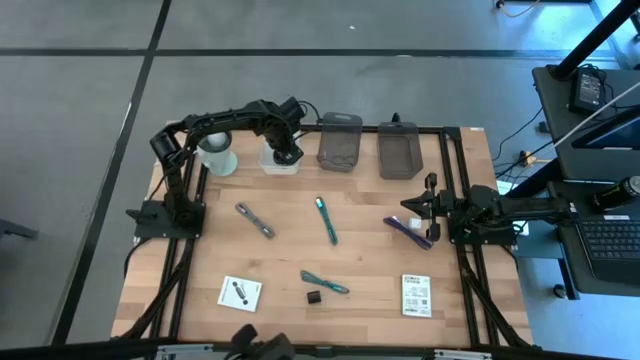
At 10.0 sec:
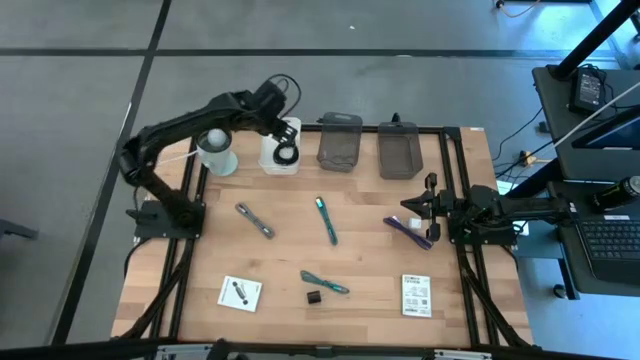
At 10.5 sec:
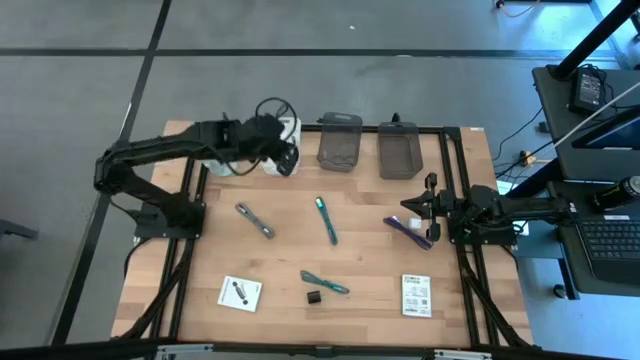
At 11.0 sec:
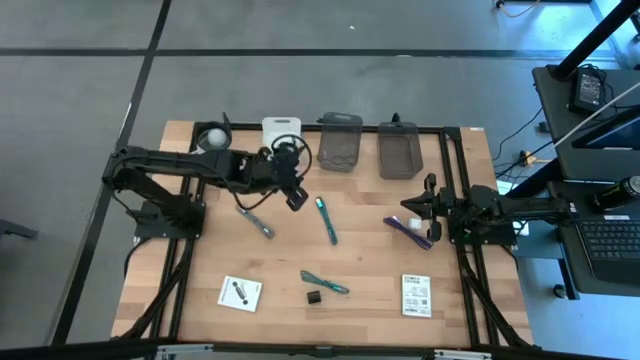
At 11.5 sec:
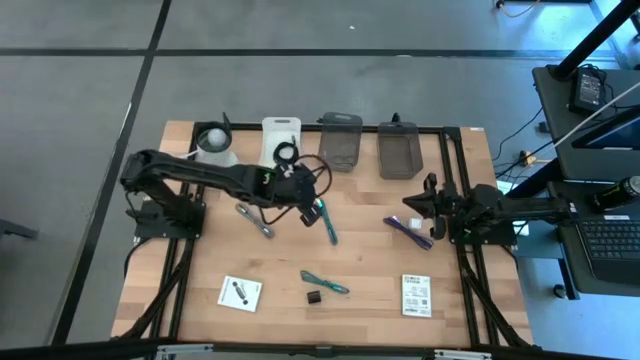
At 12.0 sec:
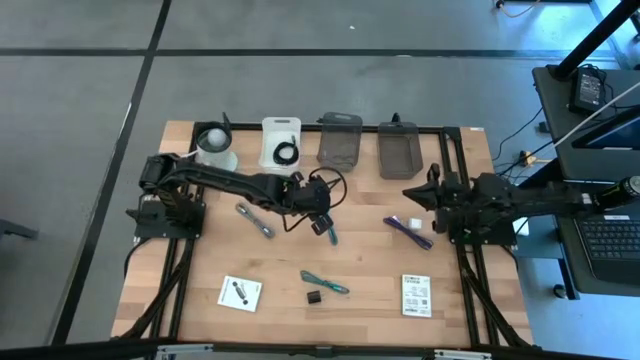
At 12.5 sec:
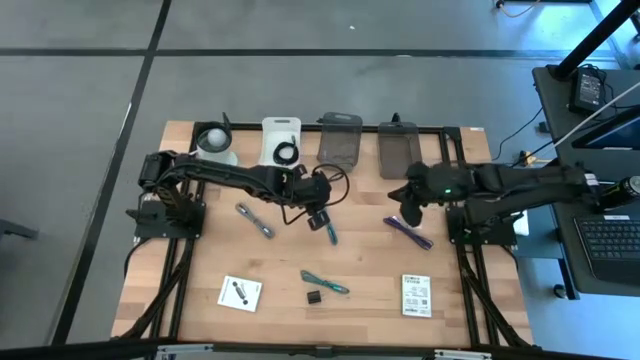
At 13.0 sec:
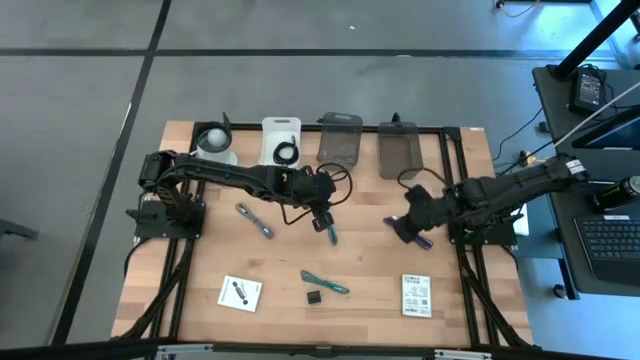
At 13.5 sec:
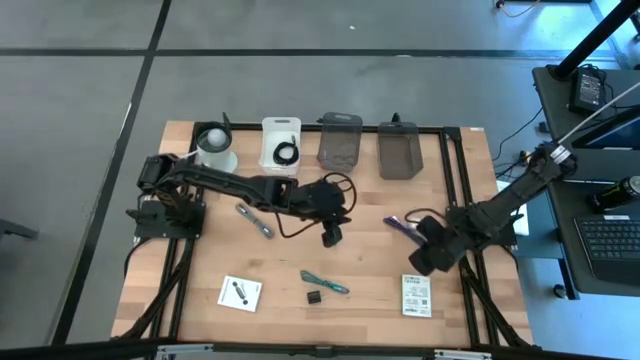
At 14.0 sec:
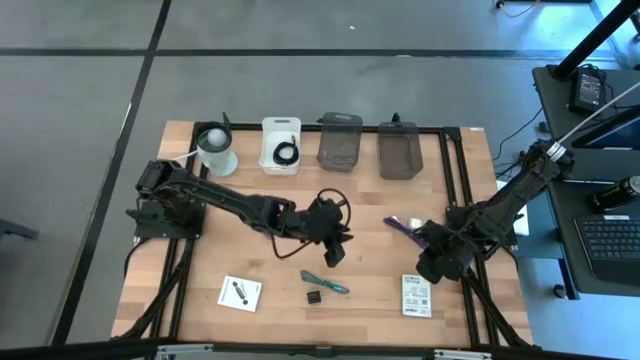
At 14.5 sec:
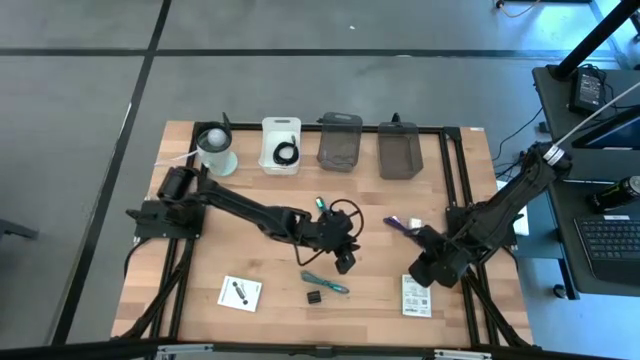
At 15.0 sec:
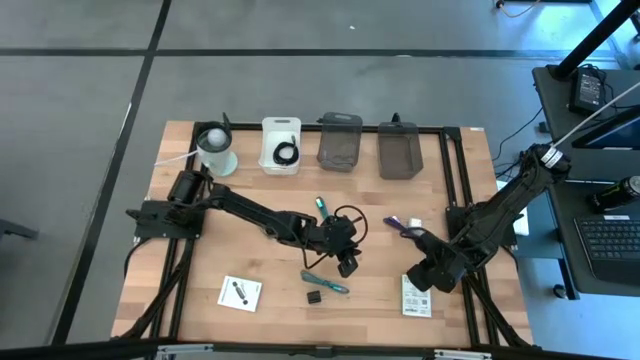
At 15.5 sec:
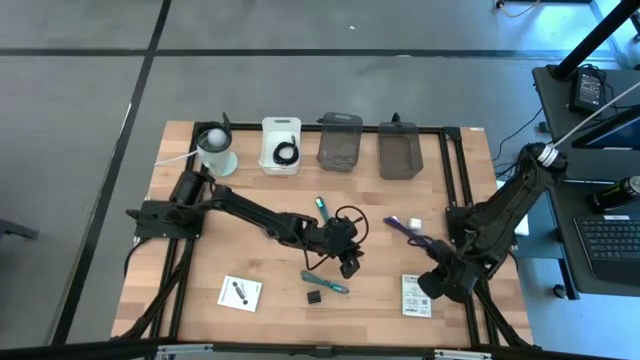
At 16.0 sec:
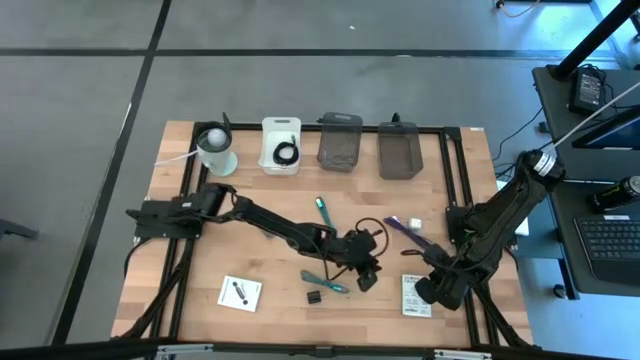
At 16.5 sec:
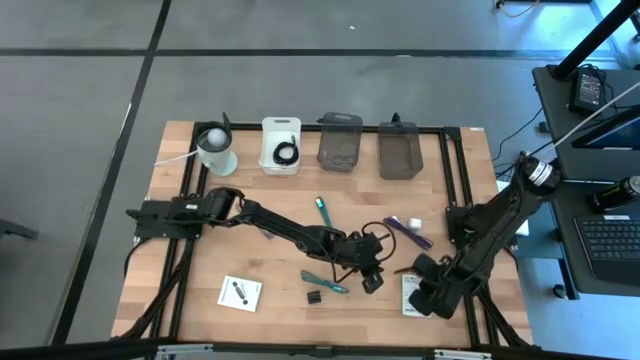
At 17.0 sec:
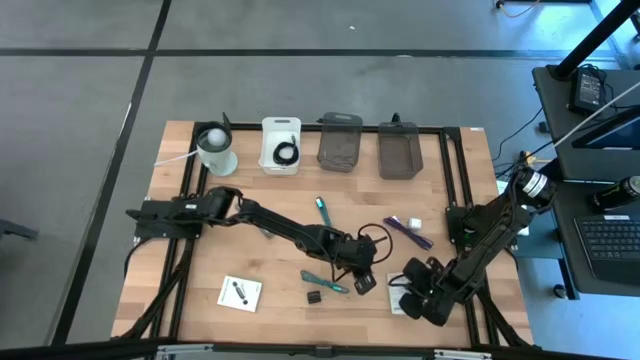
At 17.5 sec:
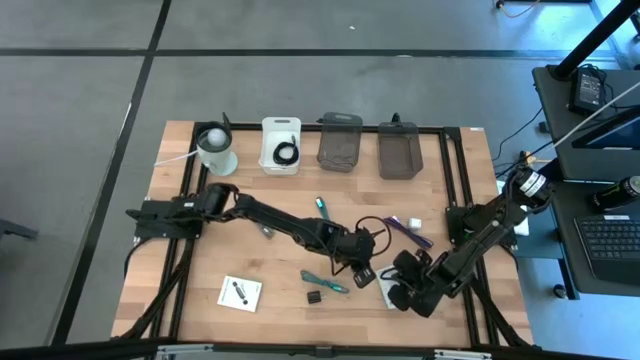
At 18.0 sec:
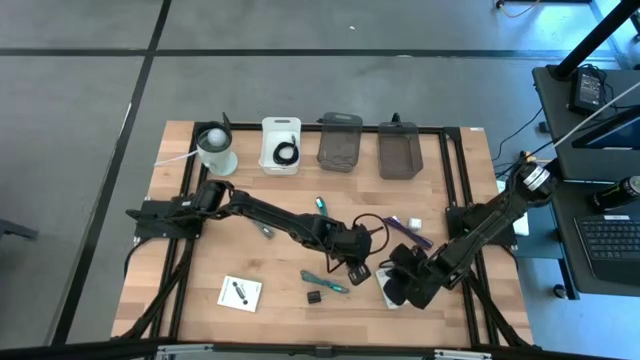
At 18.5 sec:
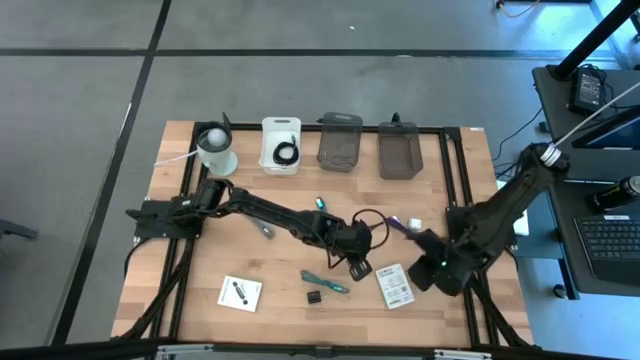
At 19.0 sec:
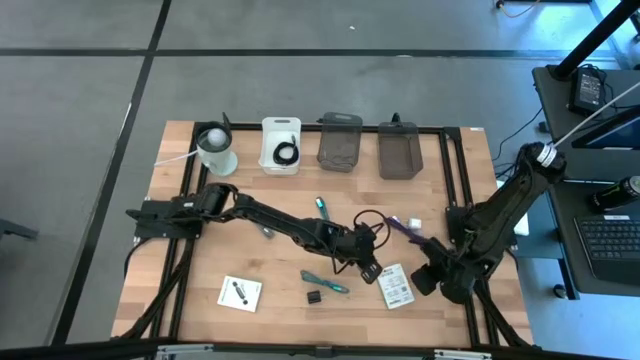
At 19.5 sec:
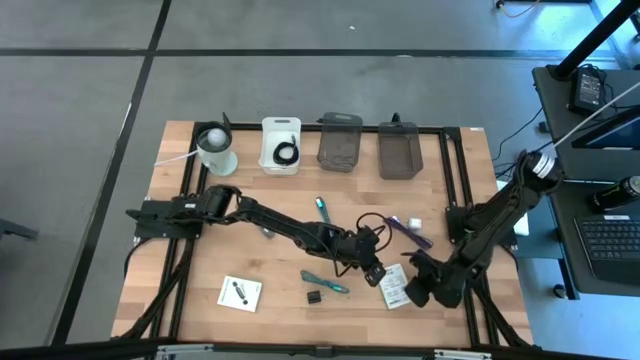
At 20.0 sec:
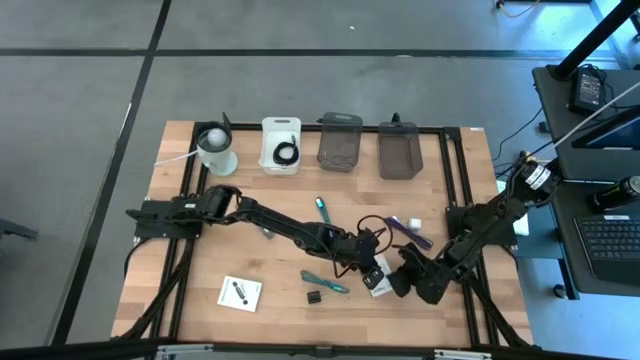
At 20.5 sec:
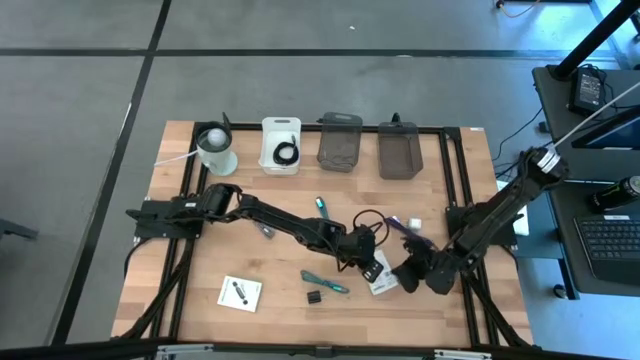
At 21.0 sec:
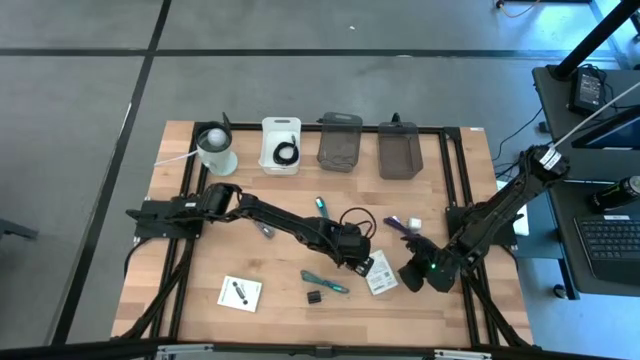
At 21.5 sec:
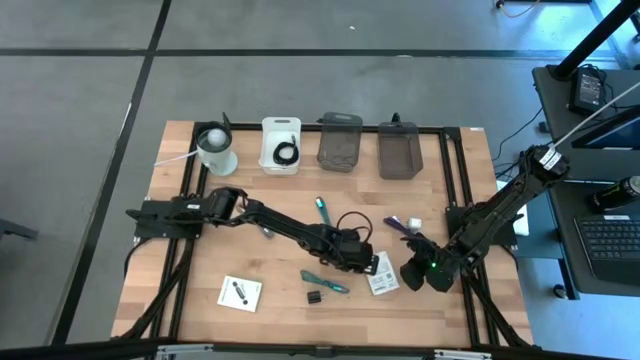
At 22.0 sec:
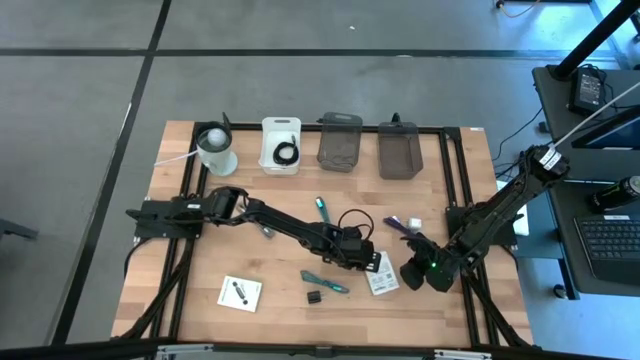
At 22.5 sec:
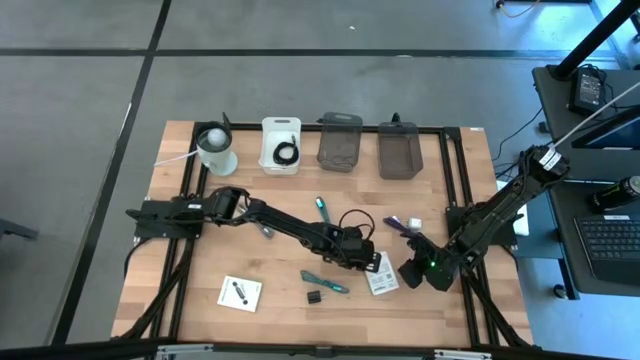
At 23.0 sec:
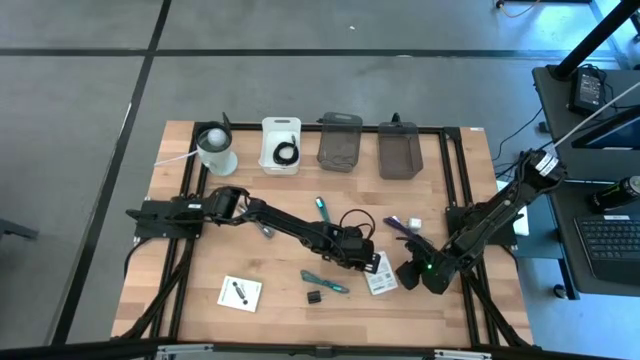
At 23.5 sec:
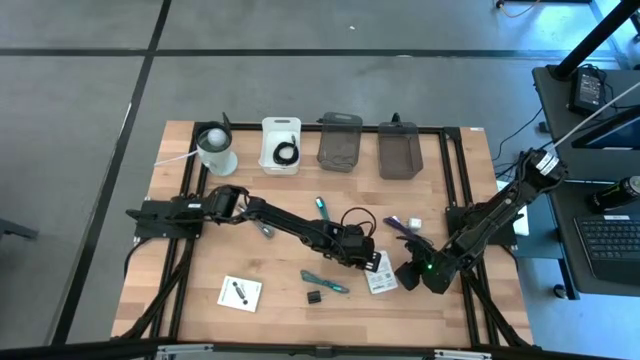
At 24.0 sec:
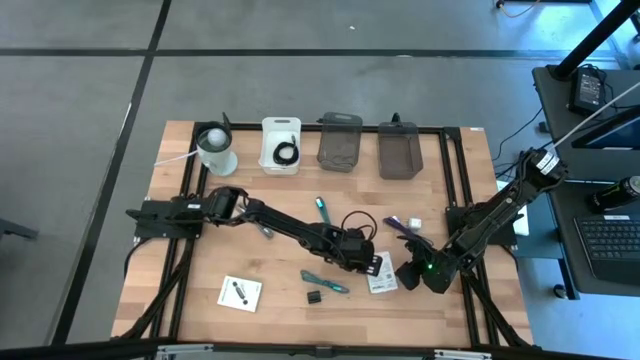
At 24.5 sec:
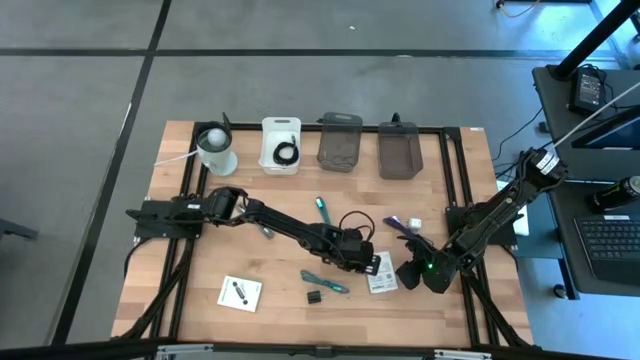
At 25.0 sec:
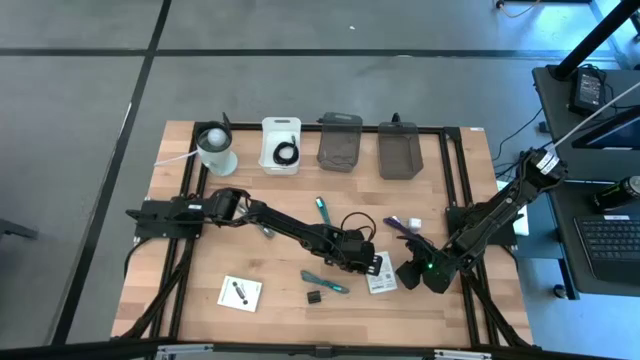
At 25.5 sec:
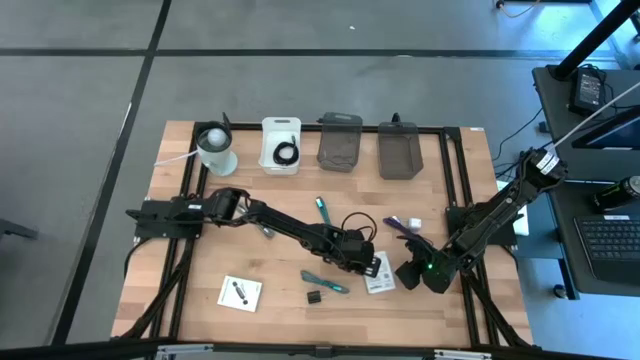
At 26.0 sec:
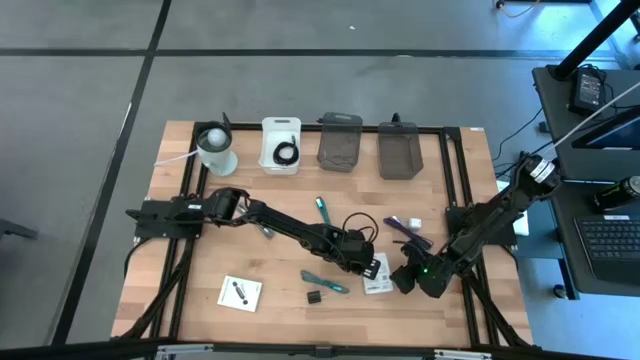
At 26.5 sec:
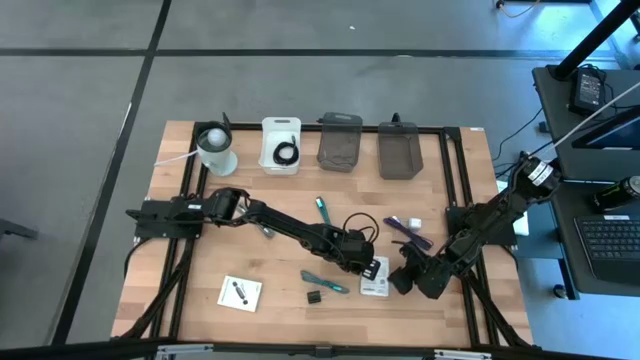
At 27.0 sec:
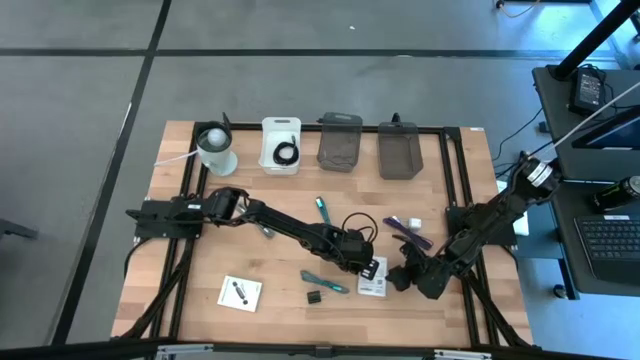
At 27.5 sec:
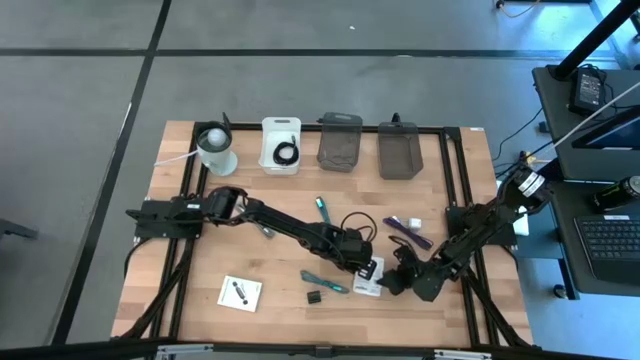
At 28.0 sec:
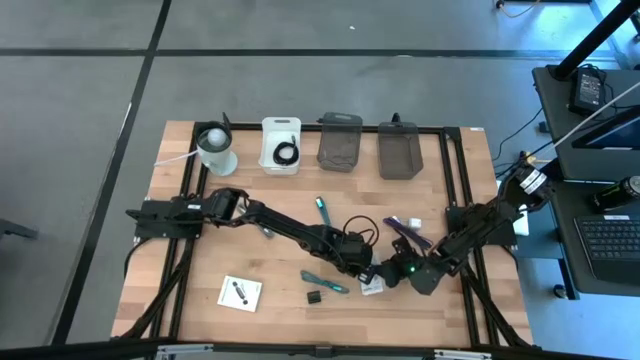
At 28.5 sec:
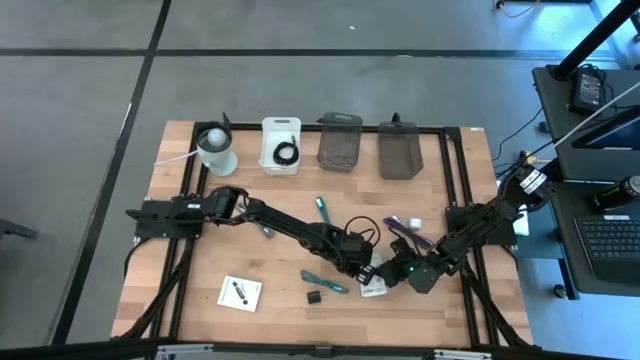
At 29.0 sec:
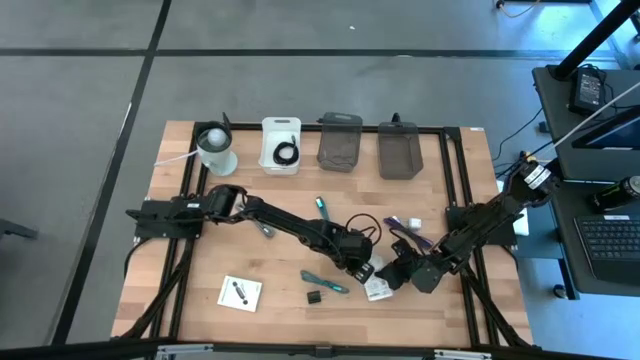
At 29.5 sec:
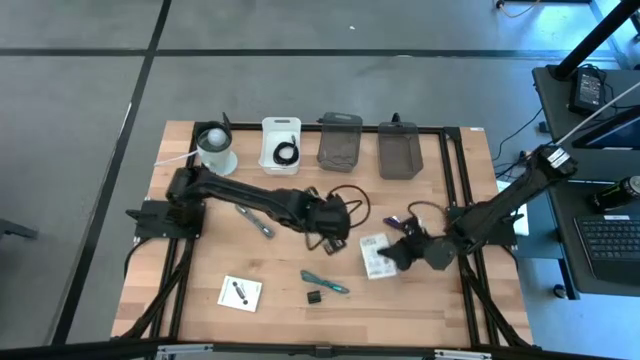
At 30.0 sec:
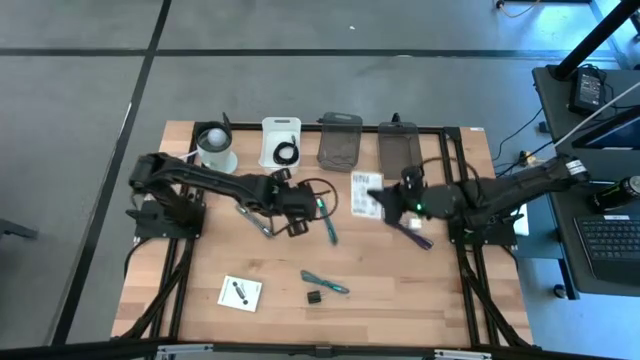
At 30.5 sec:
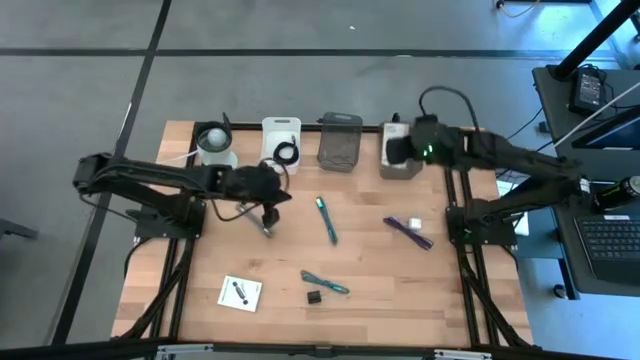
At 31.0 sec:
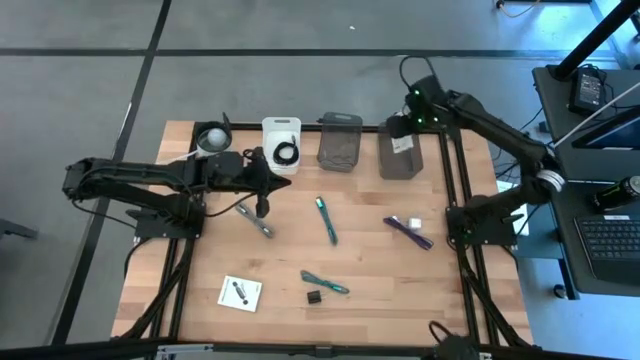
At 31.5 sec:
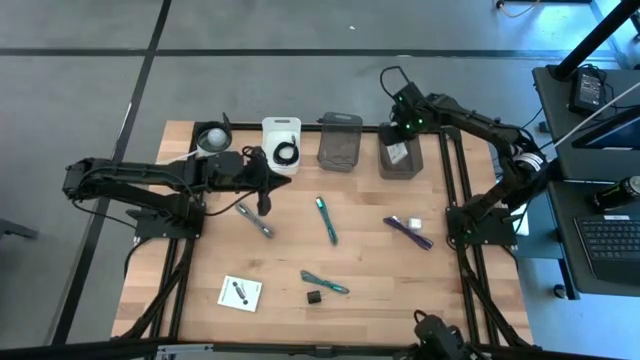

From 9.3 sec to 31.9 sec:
Task: Pick and place items into bin
Put the right card reader box into the right black bin
